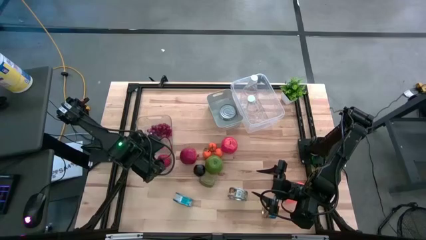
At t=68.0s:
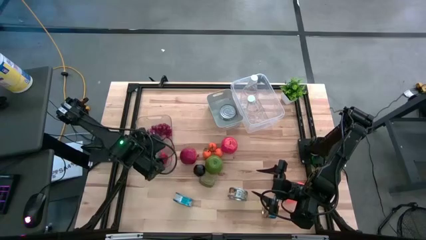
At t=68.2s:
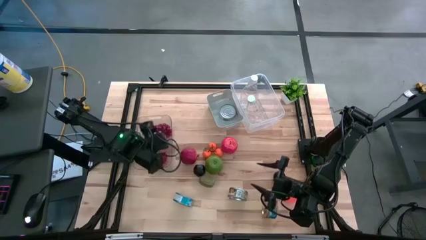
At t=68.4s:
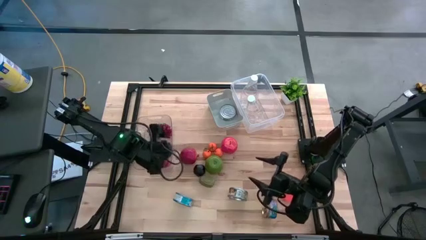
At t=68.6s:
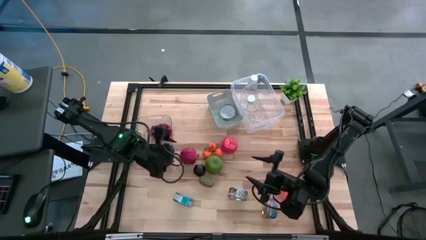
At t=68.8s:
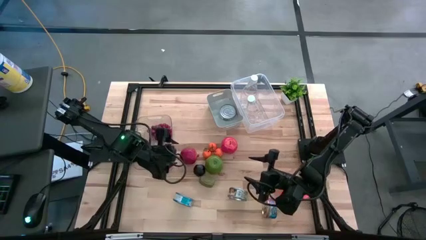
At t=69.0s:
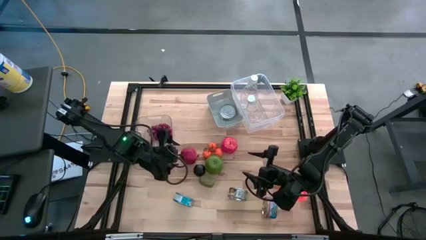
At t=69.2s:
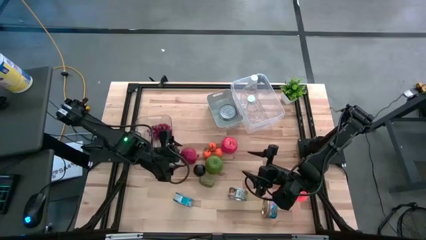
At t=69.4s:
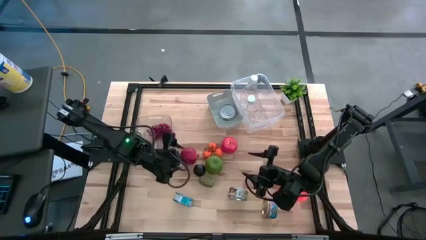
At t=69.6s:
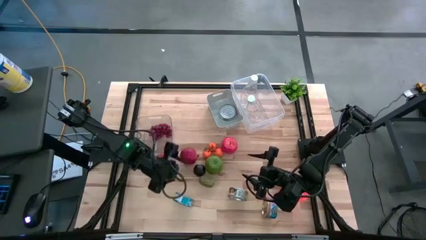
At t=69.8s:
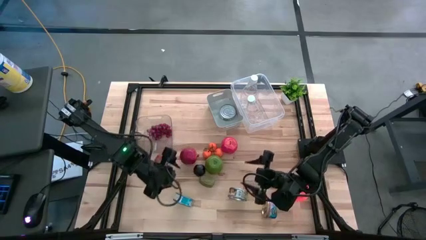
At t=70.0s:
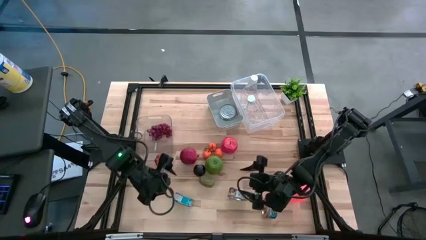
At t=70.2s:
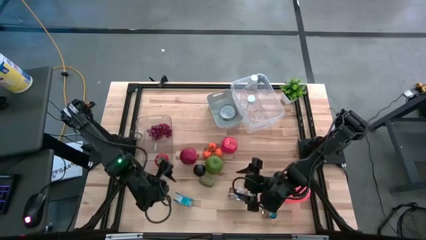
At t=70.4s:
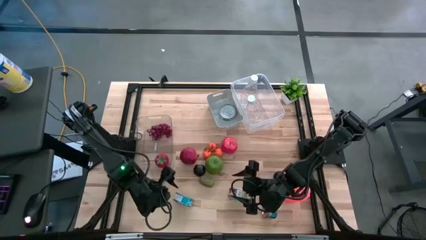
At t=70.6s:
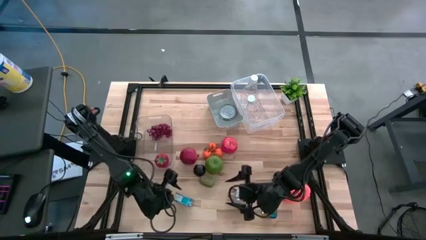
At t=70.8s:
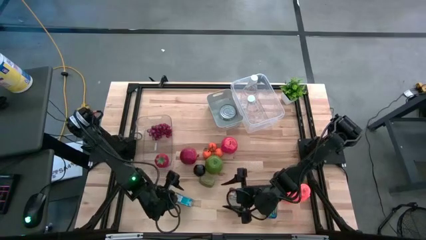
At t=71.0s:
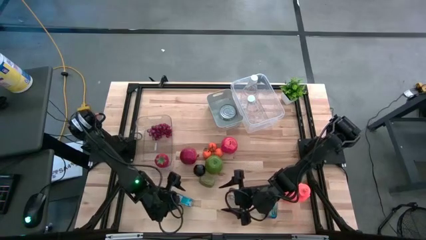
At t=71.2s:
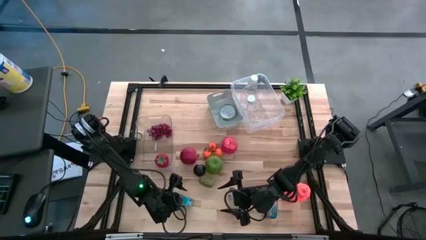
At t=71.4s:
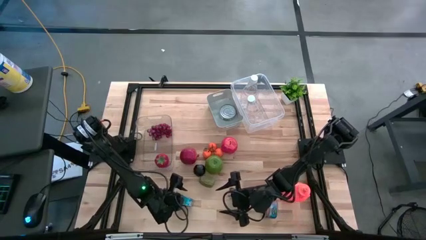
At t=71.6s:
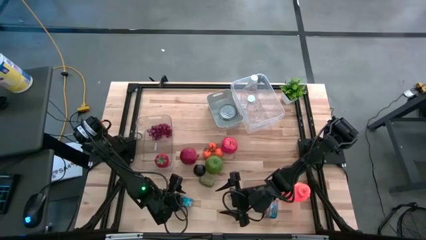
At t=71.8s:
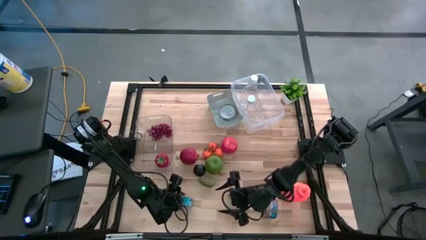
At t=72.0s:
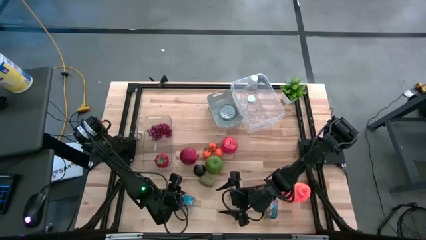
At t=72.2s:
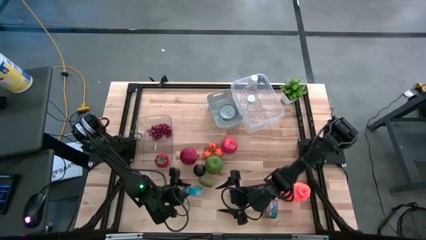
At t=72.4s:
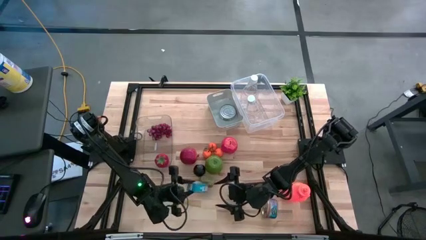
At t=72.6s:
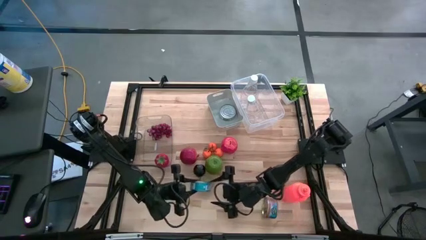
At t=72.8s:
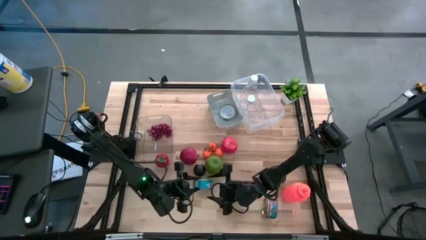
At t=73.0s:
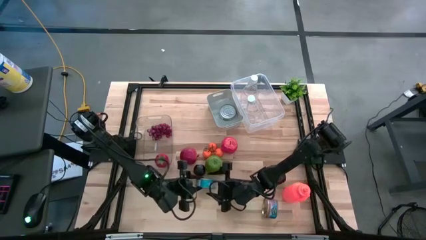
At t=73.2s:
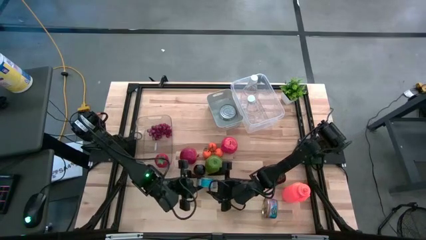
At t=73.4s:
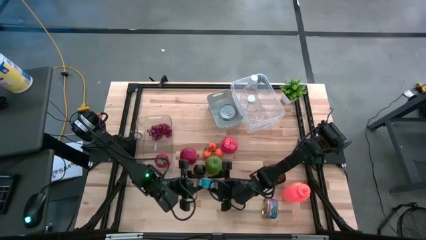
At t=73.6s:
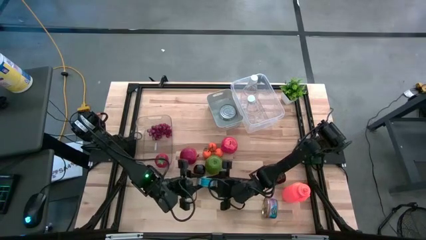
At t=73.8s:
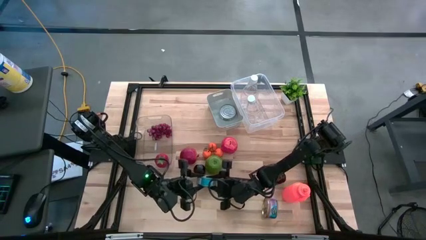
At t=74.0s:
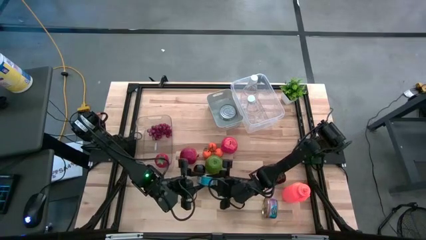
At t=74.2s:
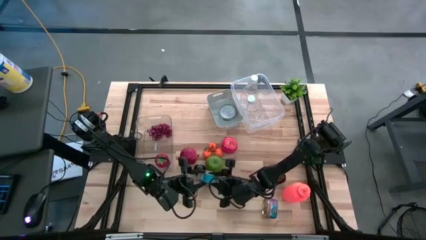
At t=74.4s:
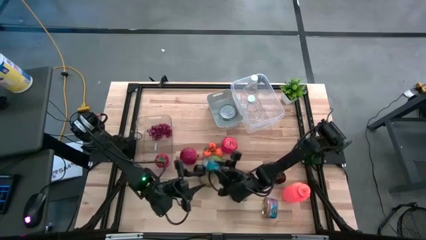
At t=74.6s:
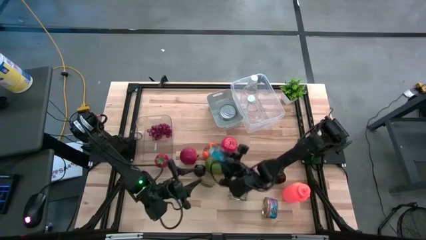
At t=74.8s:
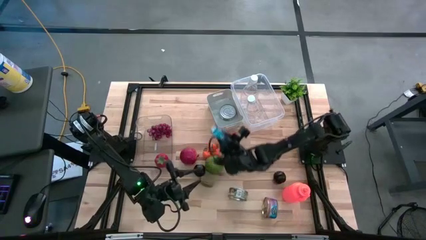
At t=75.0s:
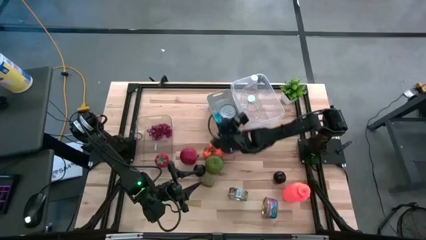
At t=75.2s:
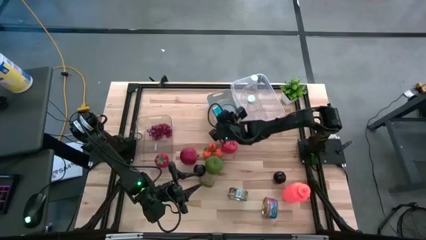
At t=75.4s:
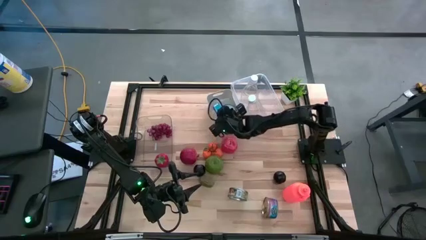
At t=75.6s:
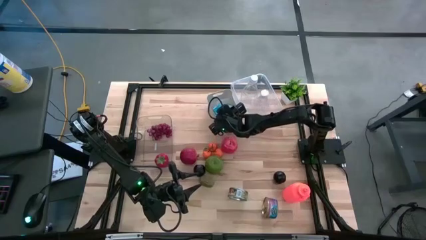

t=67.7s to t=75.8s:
Task: Pick & Place Food Item
Put the light blue tuna can into the white bin

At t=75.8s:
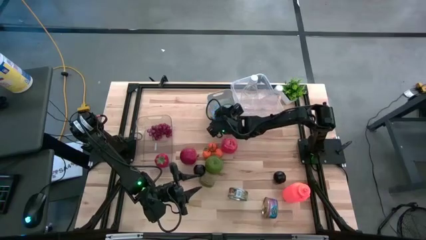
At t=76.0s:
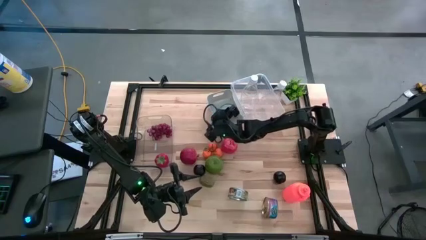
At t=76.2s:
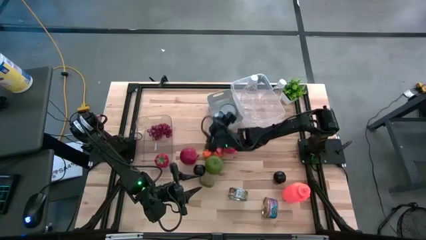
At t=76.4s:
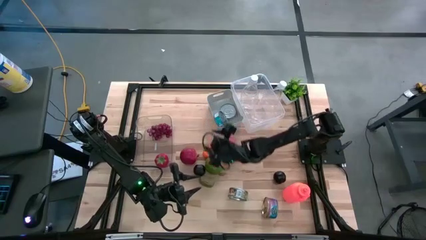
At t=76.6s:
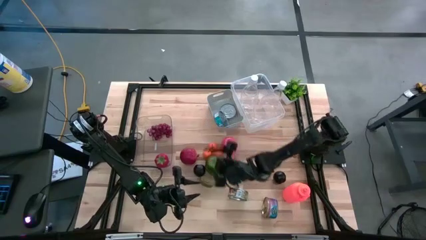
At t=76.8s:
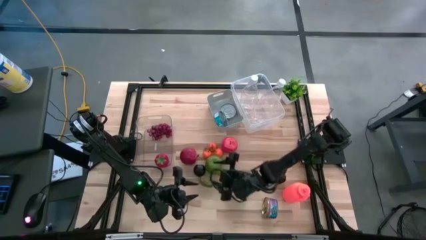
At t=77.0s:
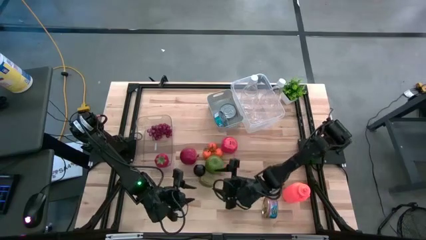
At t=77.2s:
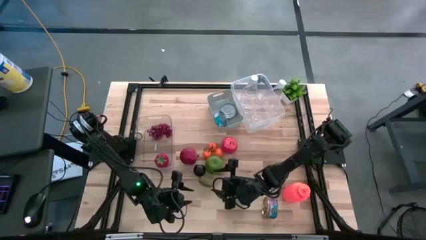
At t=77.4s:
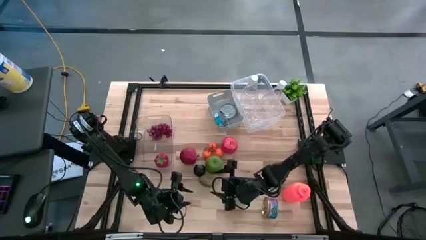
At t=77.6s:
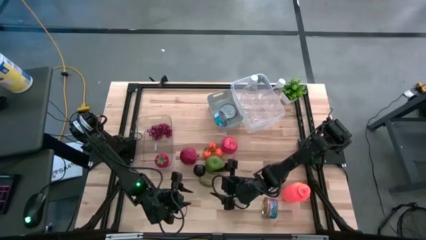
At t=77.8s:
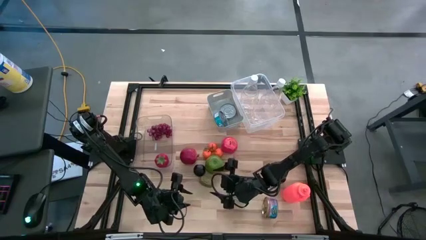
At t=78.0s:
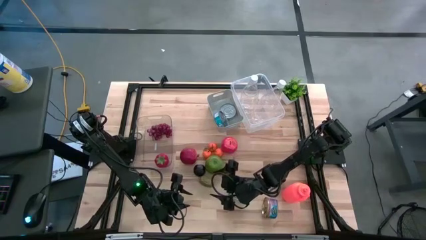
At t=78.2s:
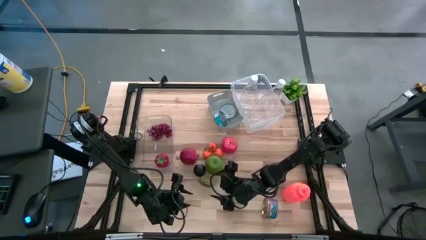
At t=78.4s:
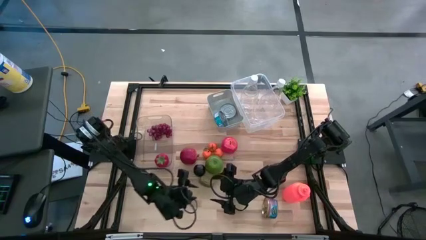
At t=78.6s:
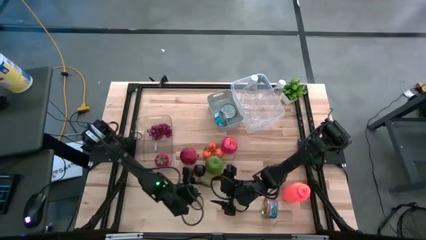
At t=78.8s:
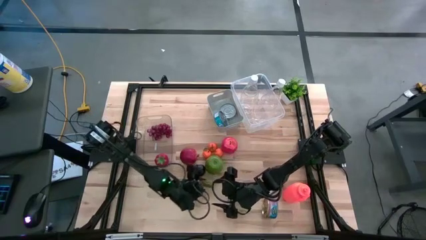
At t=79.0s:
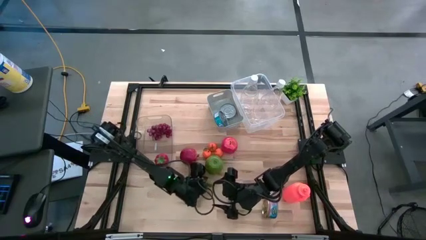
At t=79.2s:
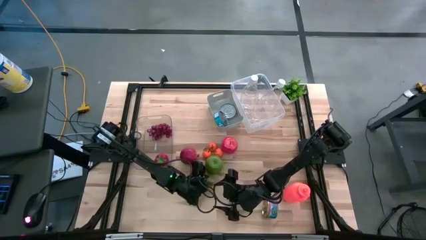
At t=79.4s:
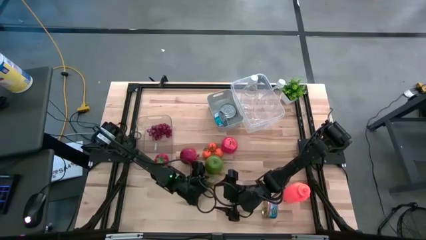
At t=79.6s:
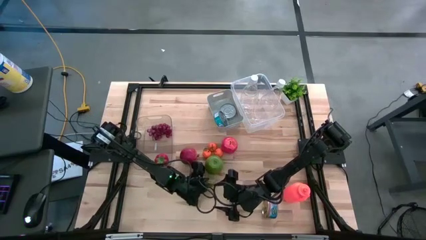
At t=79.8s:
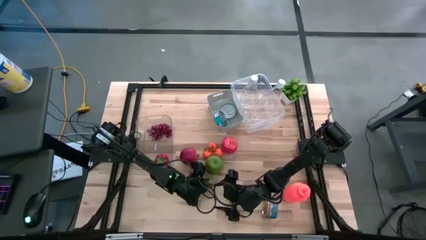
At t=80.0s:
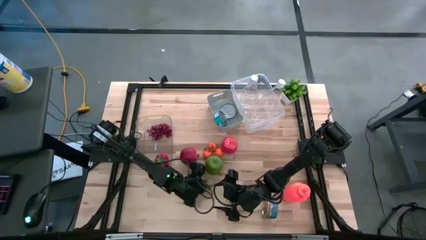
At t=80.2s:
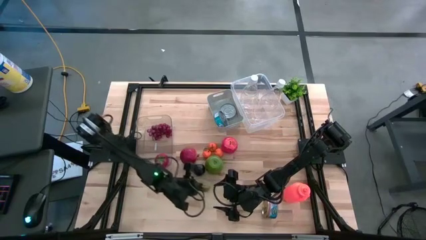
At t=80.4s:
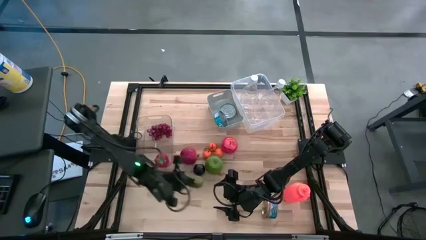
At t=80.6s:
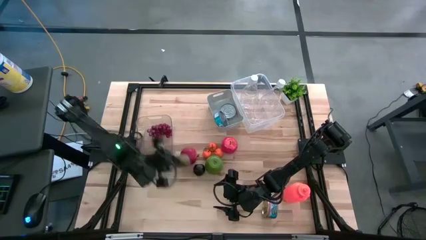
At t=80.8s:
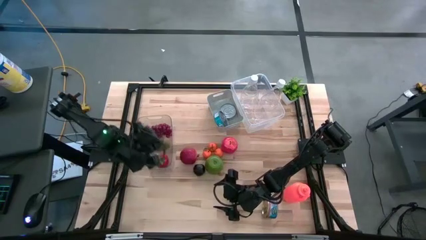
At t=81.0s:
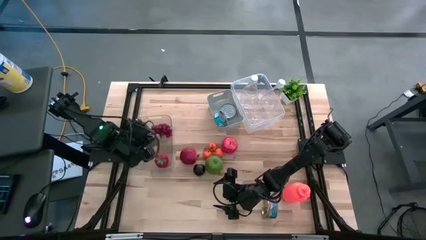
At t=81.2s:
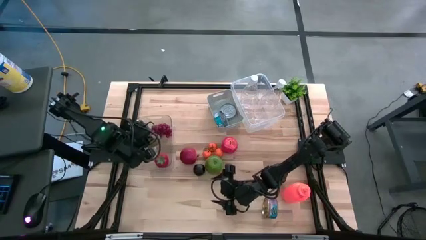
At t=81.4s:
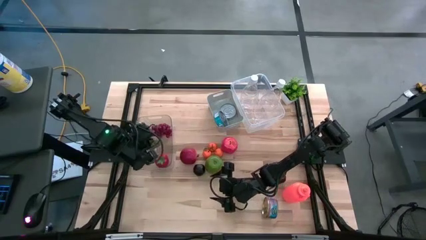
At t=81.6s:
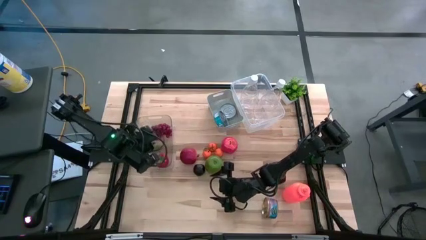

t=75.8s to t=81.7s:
Put the brown kiwi into the left transparent bin

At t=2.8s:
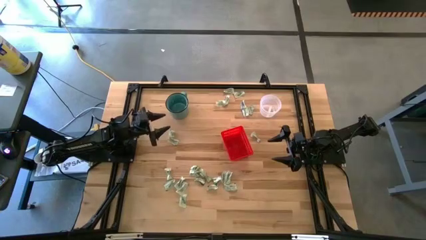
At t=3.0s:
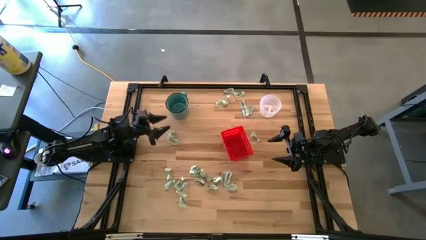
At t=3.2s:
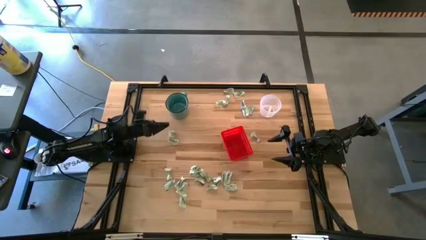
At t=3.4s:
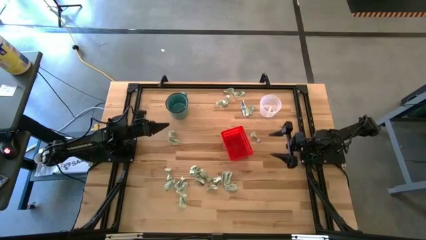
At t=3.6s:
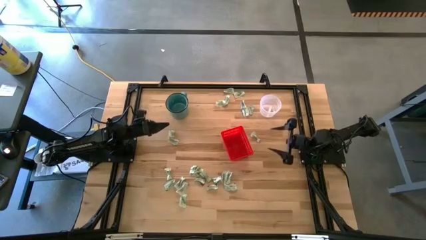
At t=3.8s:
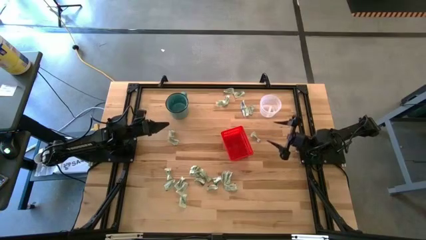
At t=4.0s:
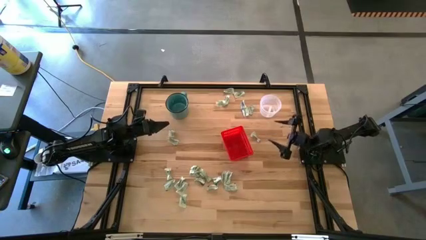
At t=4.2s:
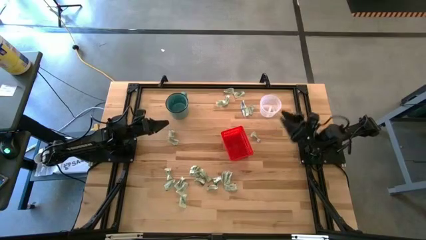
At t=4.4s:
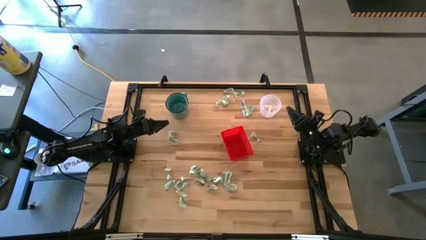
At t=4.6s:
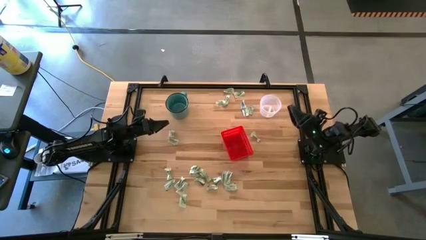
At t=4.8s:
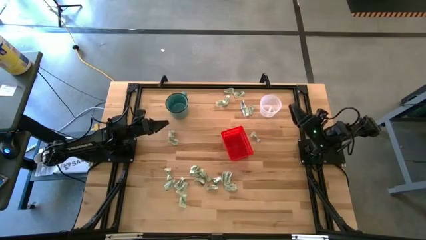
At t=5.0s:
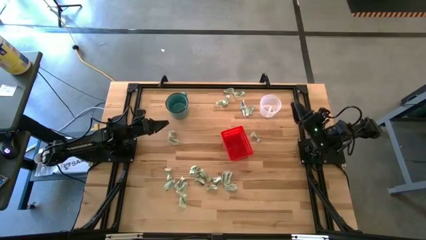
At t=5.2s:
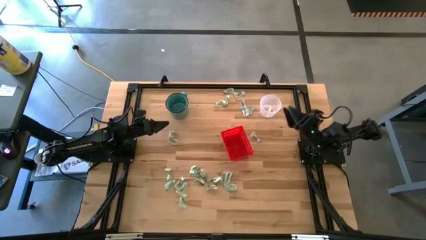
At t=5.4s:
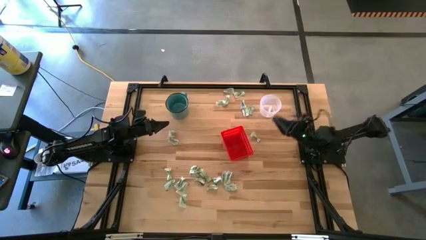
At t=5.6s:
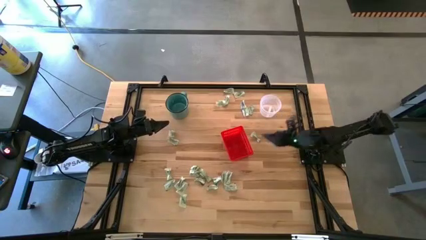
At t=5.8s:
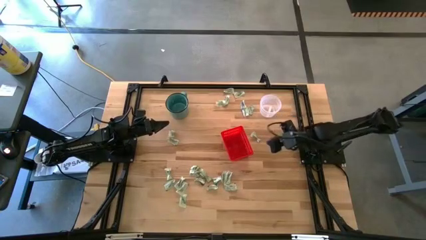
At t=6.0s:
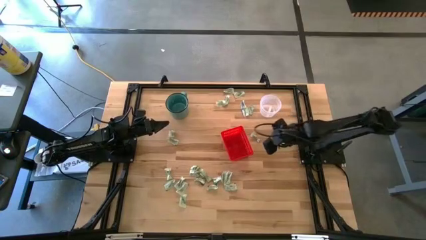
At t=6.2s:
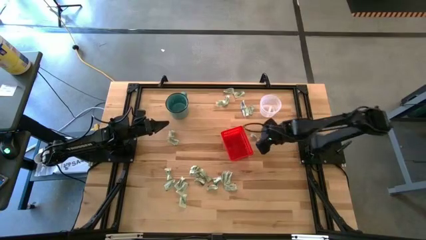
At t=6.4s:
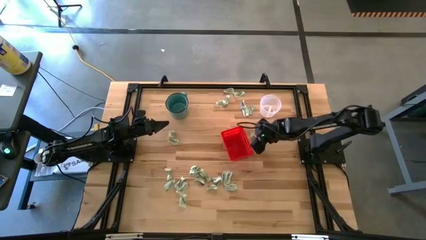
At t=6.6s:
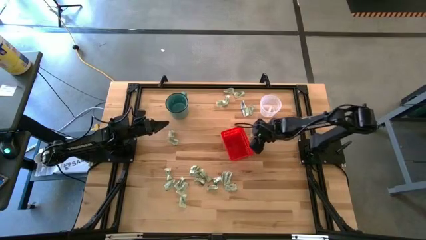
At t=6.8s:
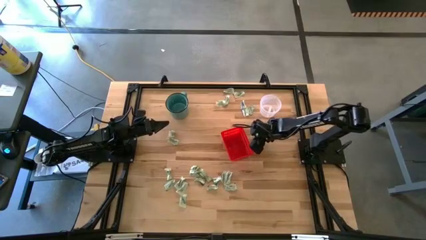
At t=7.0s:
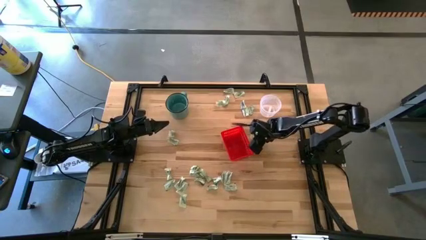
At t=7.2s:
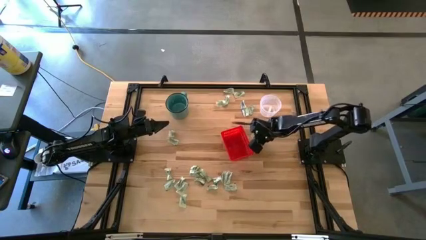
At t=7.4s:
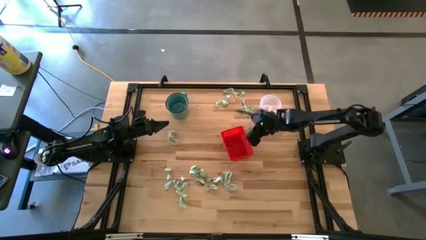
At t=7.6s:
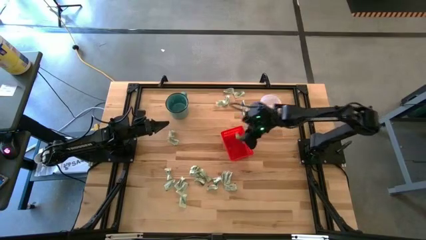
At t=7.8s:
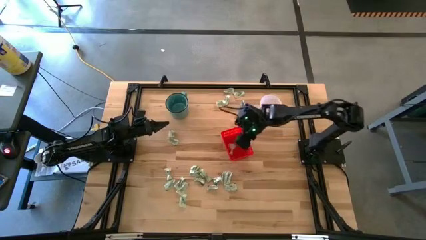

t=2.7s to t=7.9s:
Task: Pick and place items into bin
Put the stevia packet into the orange bin
